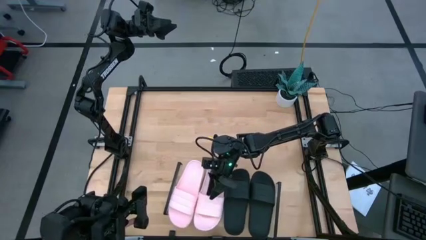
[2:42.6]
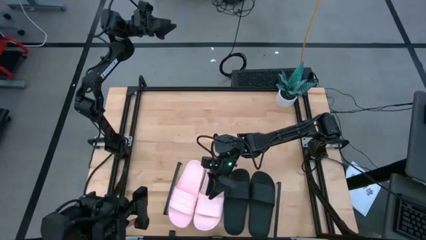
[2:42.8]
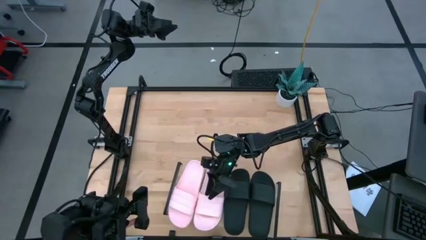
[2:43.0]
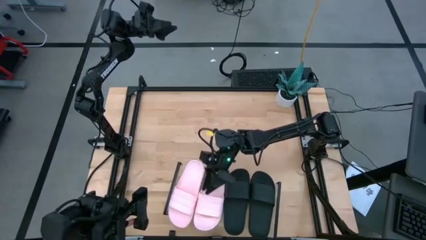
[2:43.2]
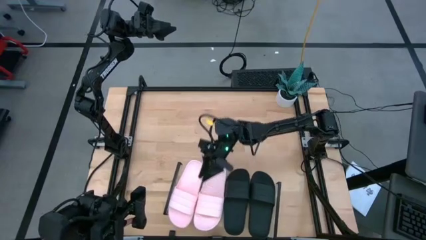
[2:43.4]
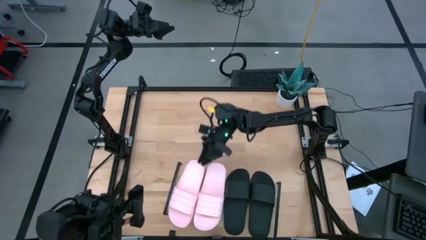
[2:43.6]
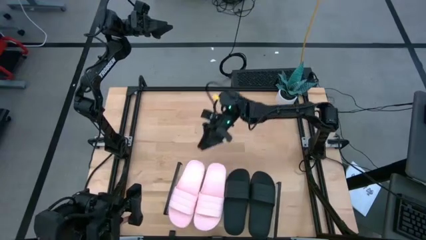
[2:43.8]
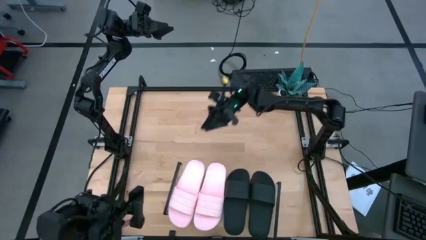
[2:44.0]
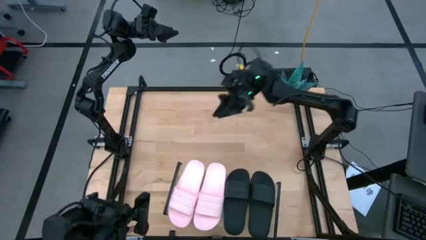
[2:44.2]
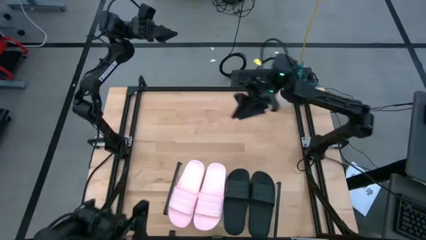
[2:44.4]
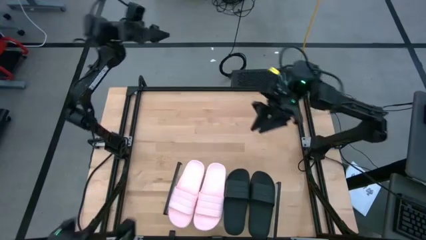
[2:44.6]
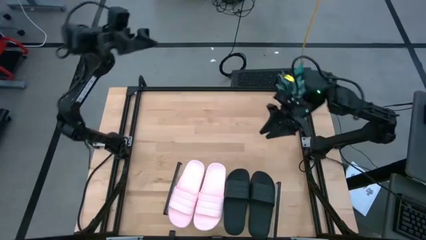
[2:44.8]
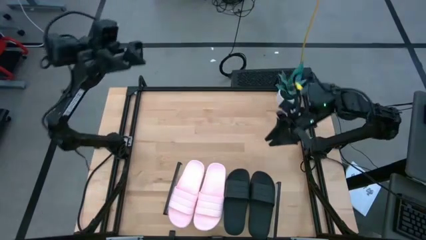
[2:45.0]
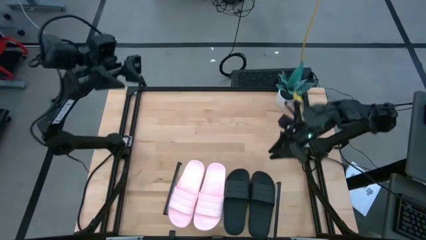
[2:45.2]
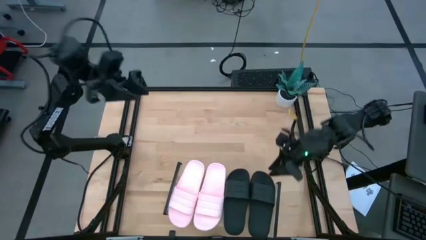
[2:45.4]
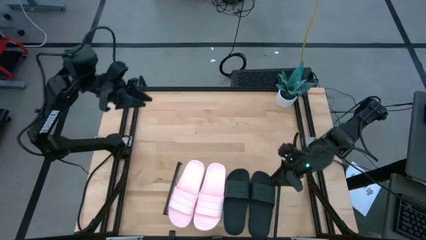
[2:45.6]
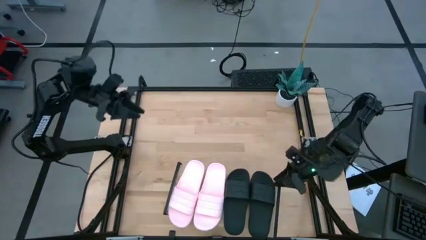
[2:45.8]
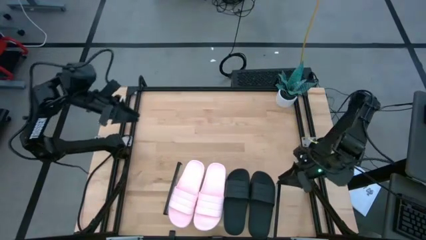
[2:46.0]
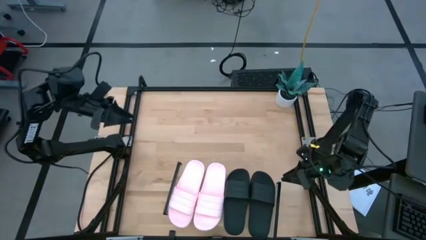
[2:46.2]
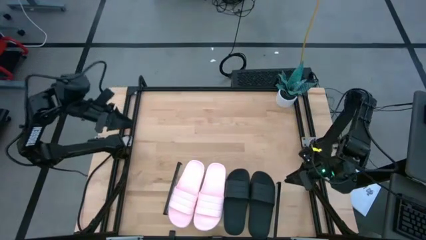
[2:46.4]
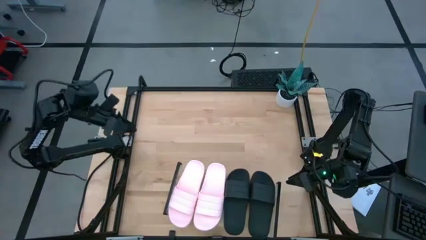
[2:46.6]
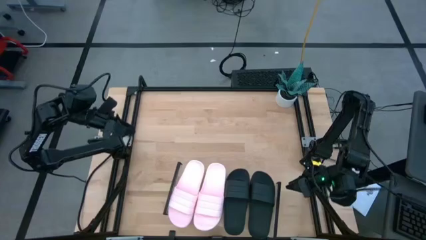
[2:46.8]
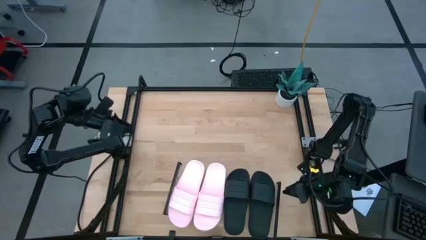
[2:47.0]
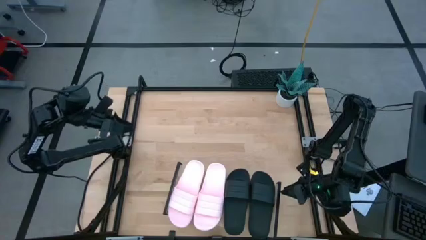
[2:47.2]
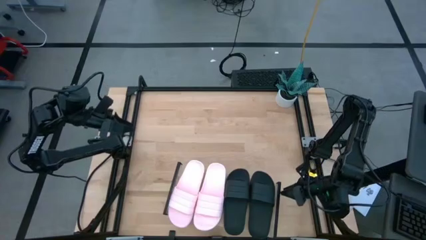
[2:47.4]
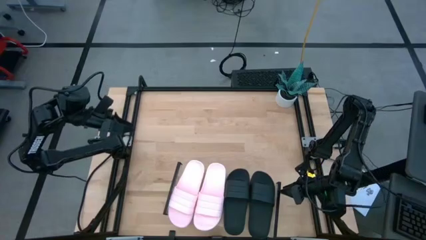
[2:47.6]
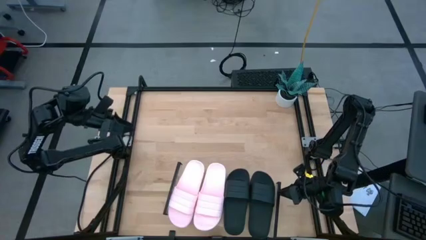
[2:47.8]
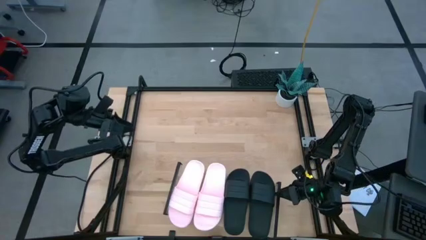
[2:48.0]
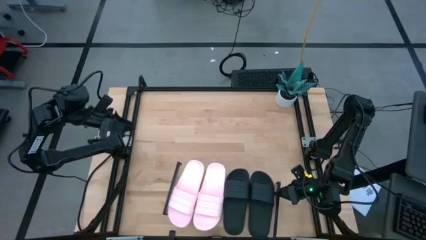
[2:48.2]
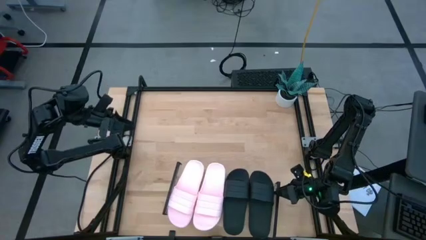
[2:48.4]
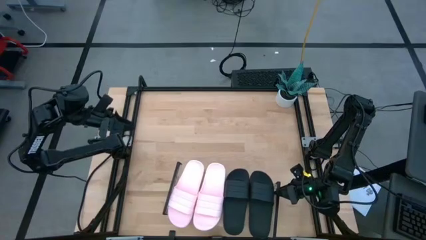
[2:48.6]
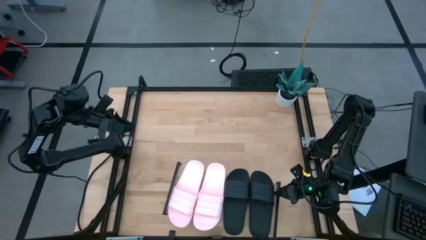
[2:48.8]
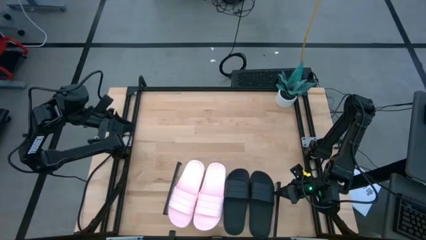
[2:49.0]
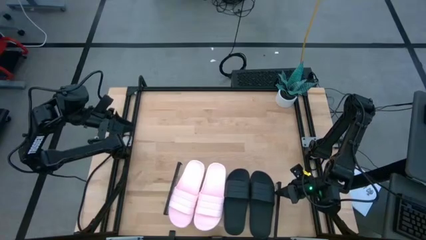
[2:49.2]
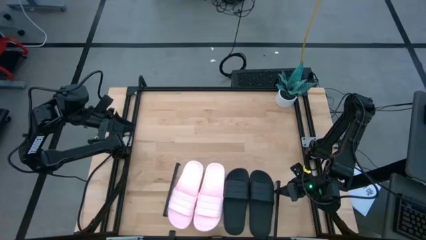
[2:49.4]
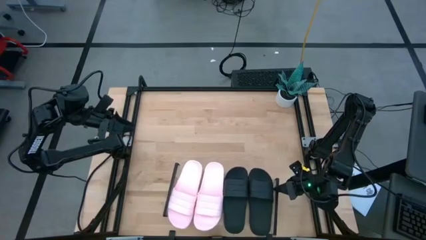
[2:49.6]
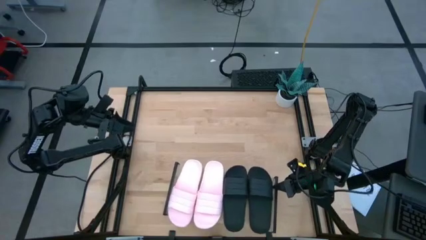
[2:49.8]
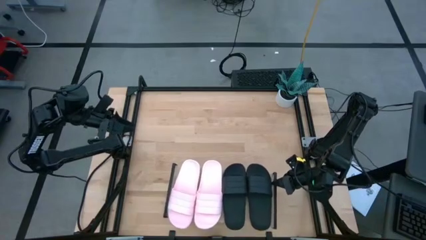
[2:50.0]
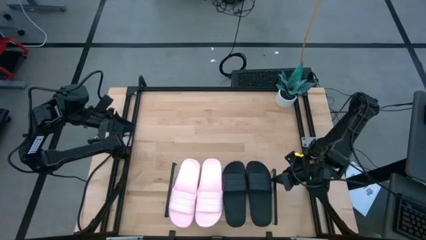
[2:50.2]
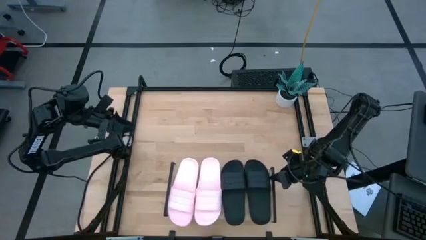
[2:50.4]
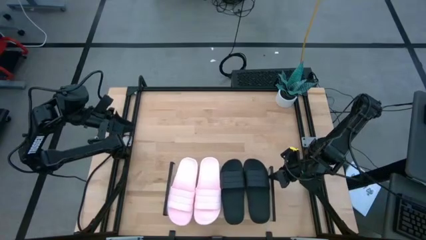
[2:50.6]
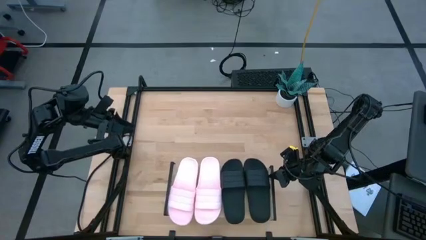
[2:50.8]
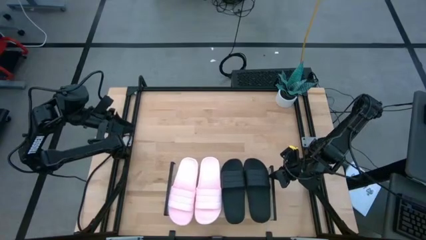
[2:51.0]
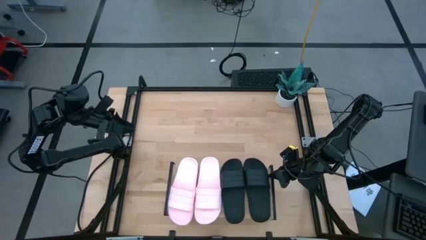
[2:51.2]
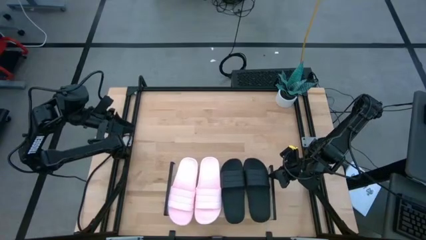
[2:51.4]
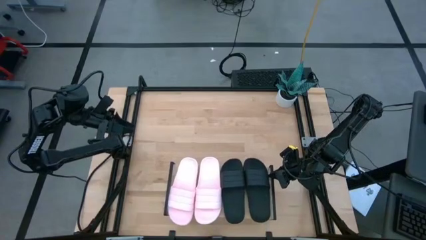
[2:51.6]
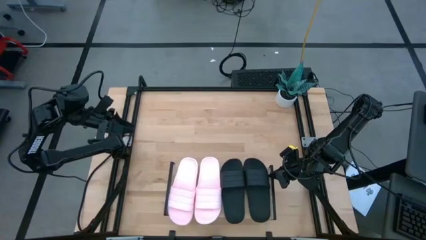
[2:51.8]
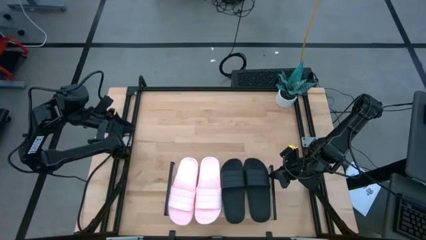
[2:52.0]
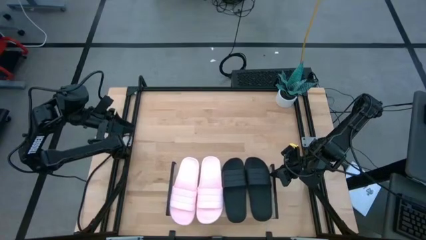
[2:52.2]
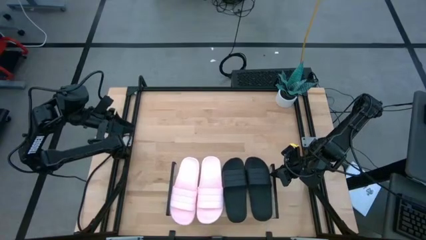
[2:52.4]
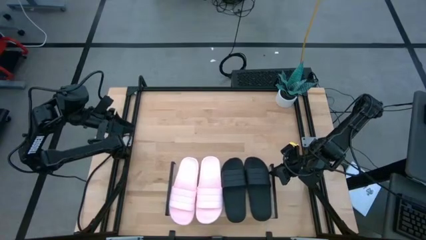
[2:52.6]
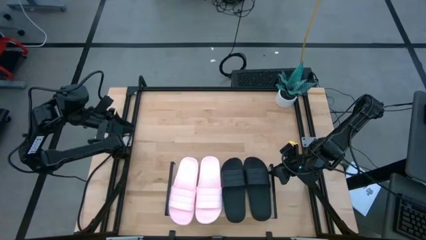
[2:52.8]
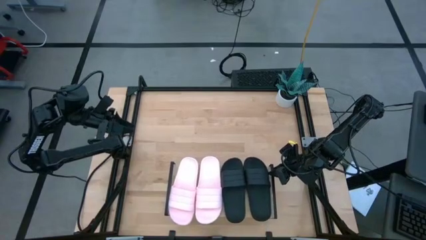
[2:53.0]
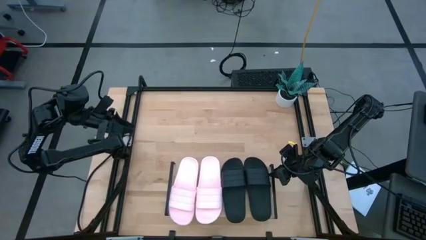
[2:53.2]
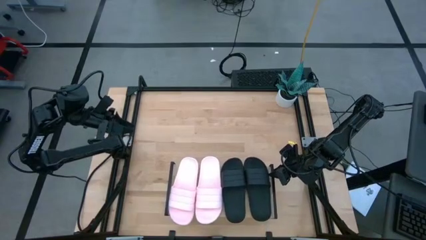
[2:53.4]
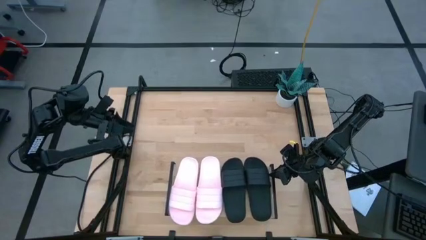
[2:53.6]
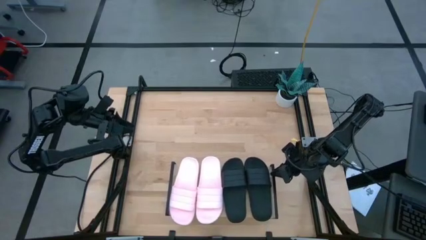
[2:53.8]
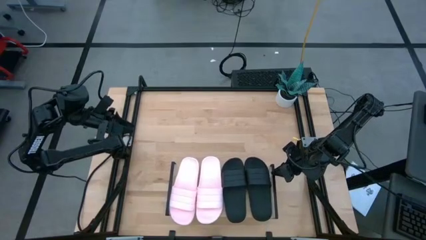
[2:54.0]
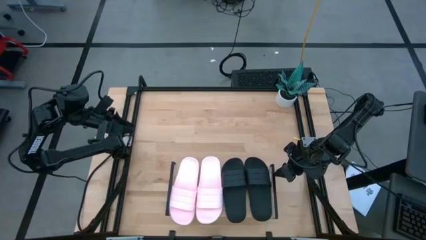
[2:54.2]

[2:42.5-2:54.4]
Task: Pick and place slides into the shelf
Adjust the shelf
